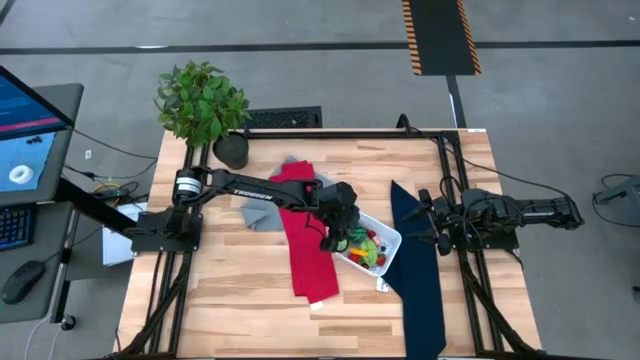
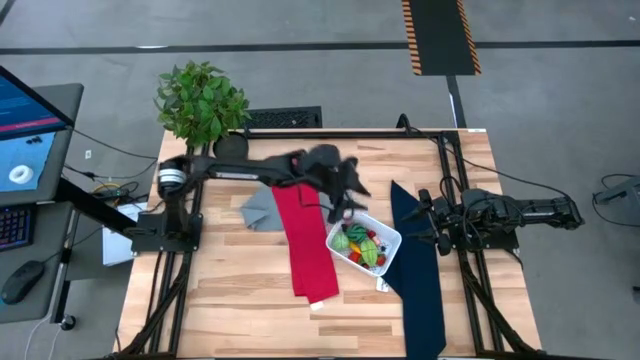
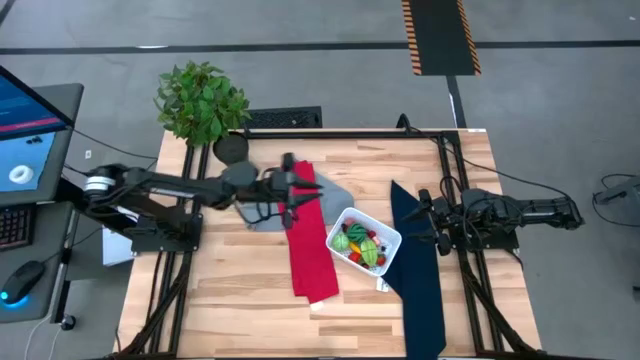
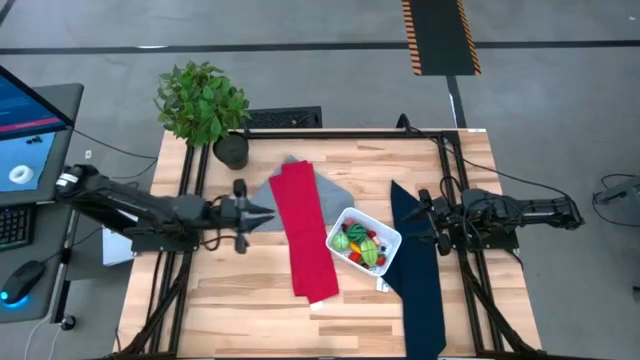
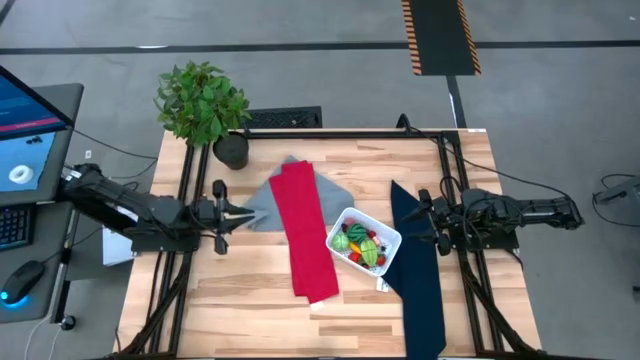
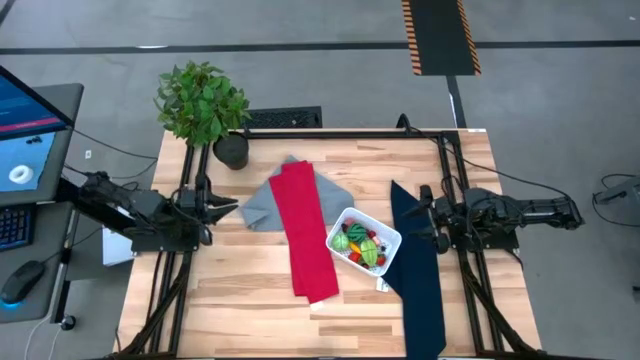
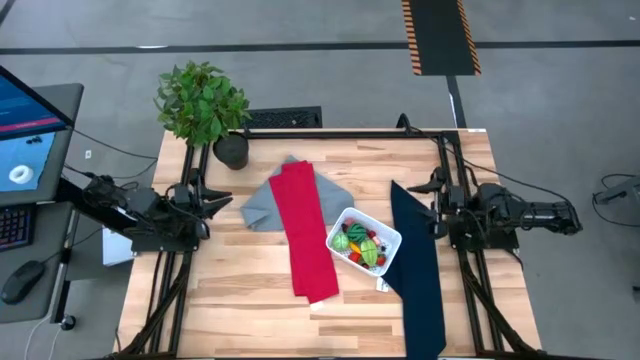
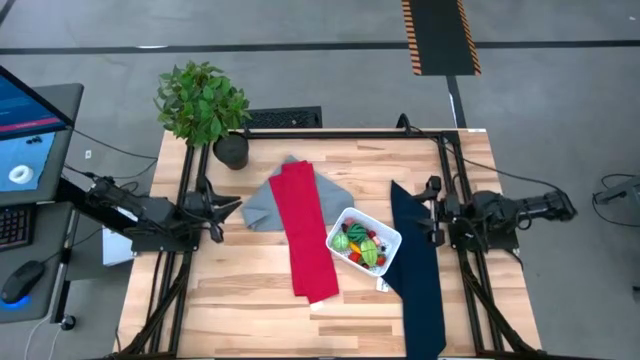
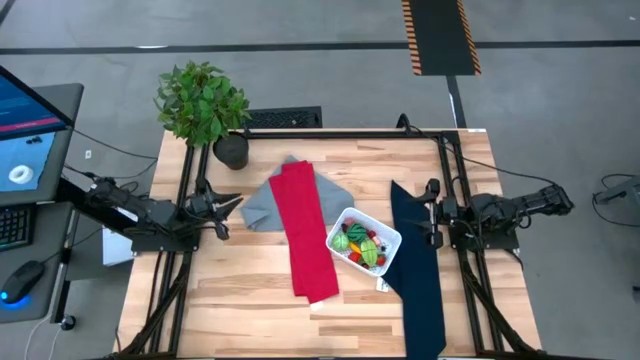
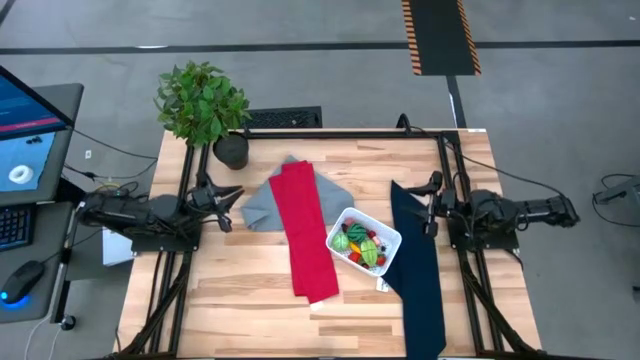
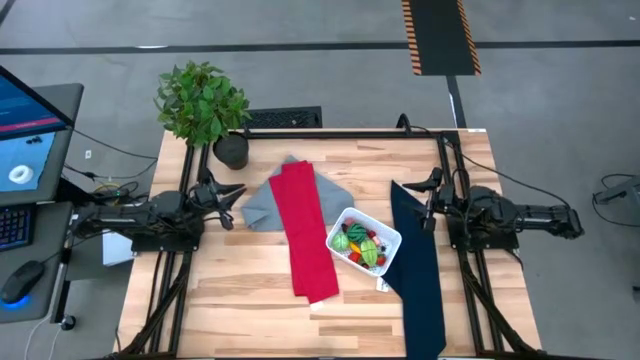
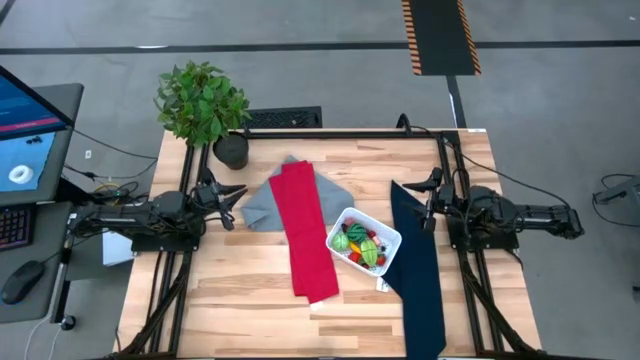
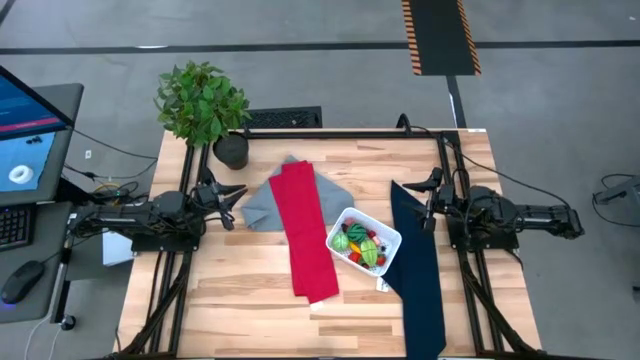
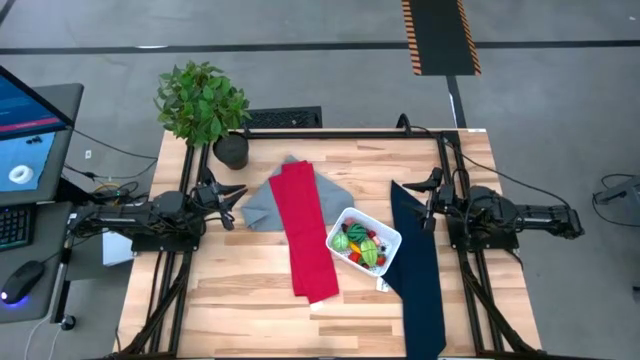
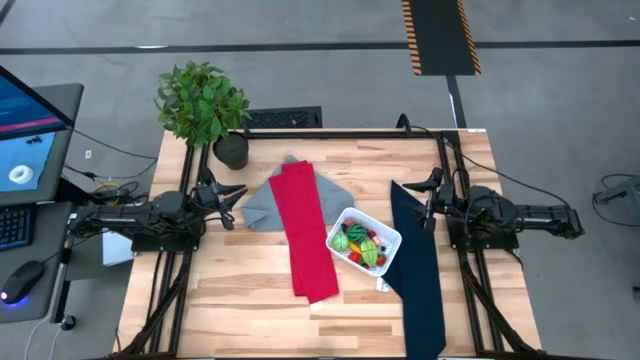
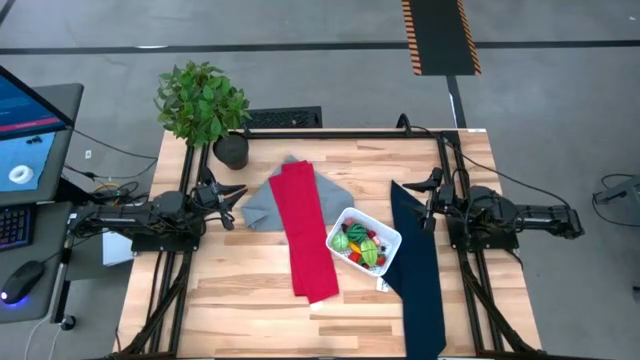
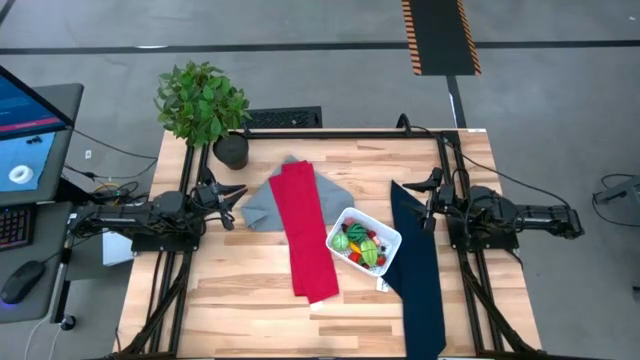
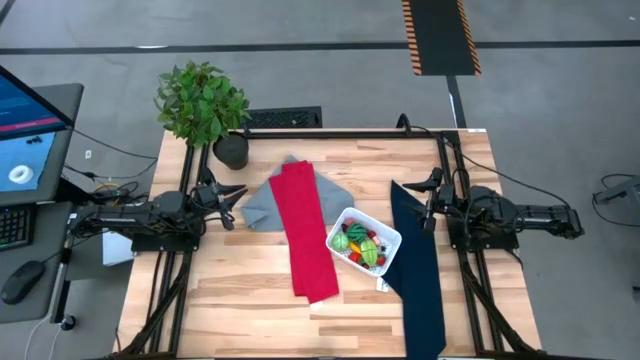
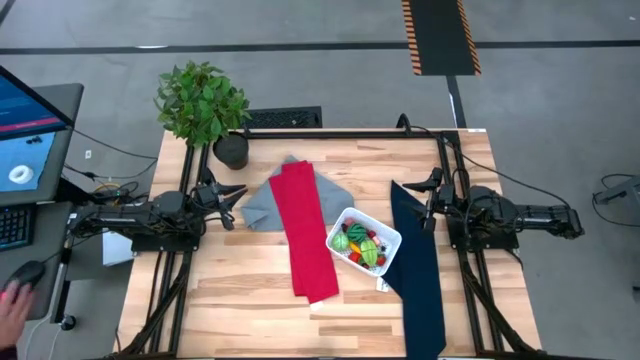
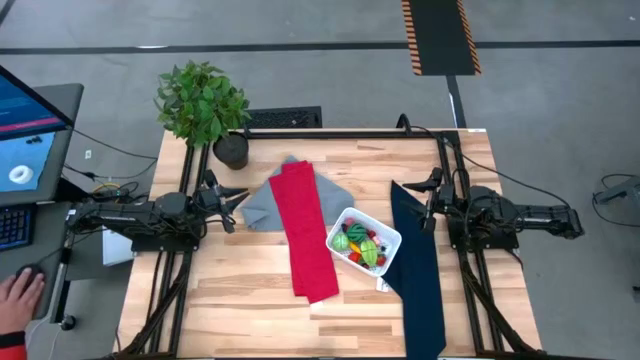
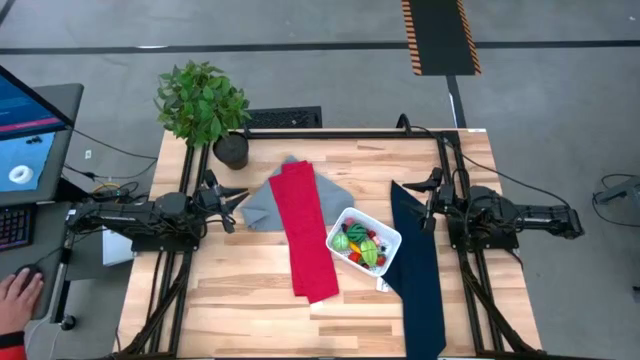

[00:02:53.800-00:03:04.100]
Task: Pick and placing Produce into tupperware
Return to Home Position

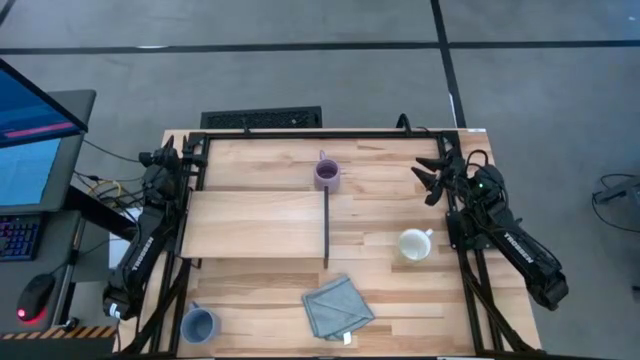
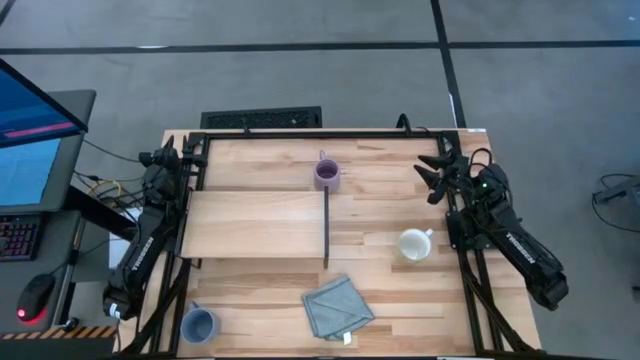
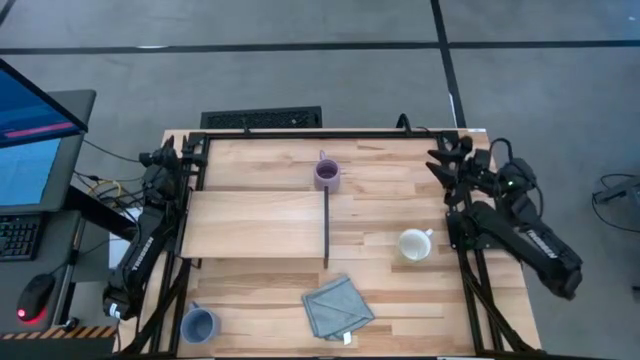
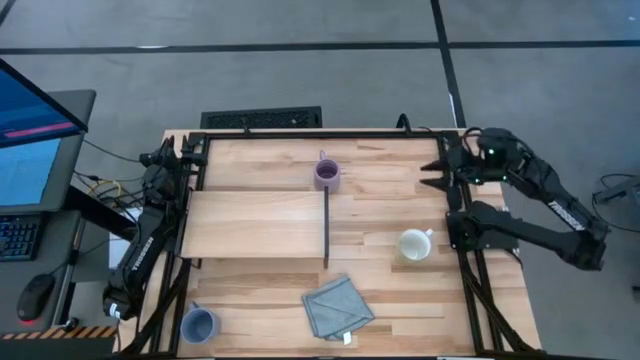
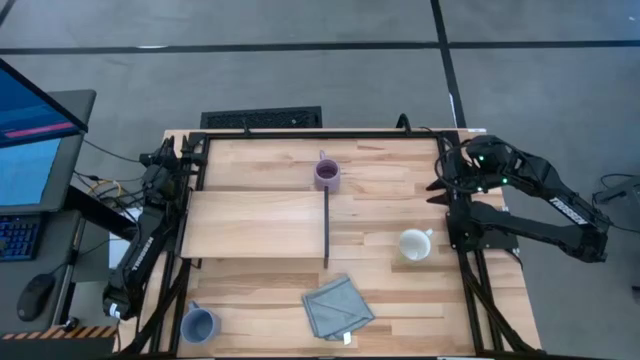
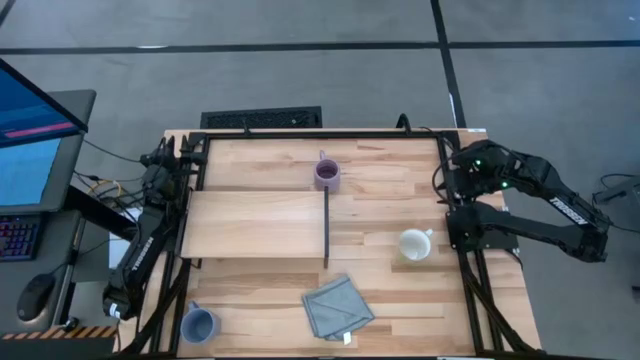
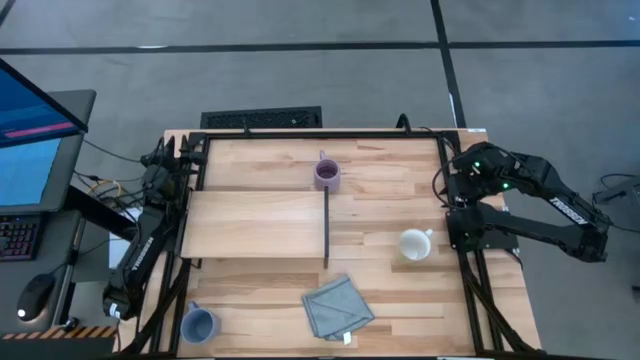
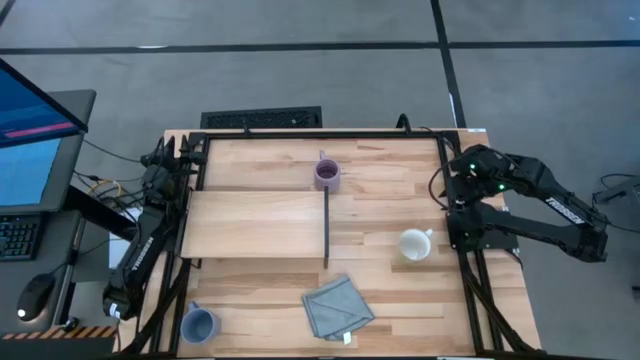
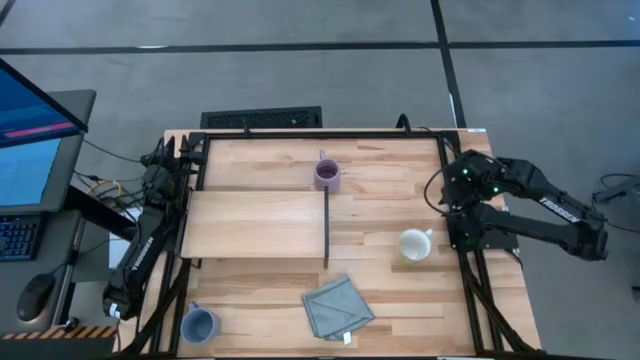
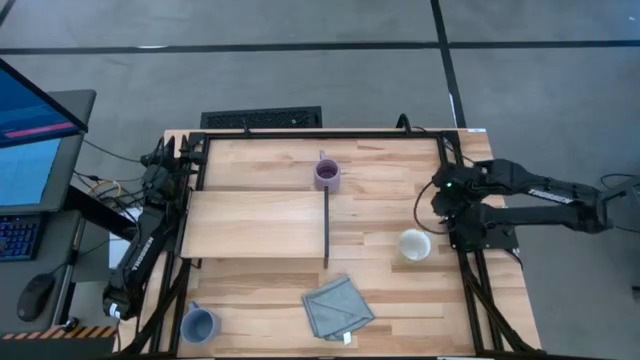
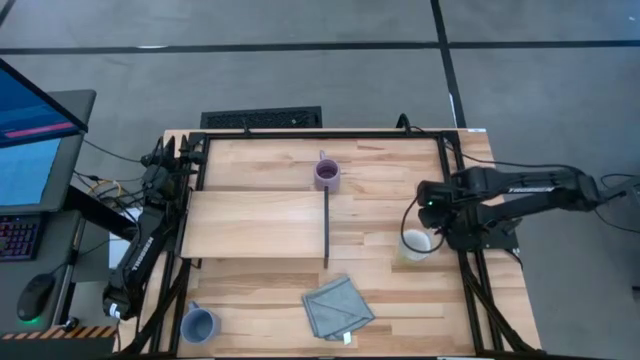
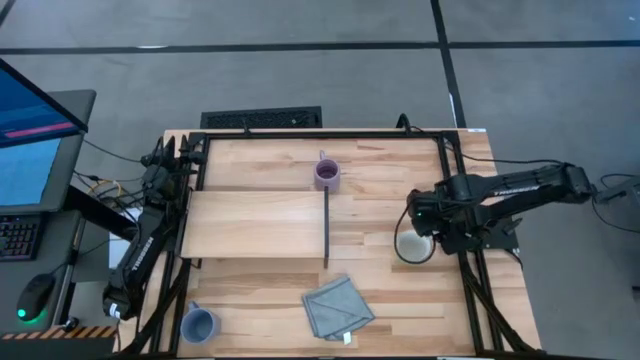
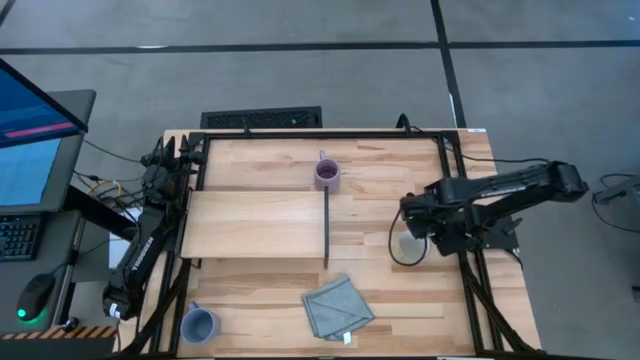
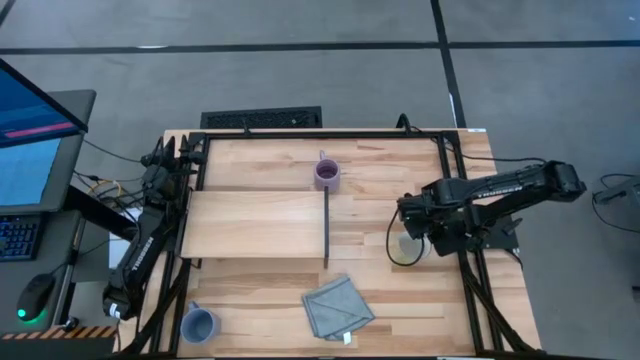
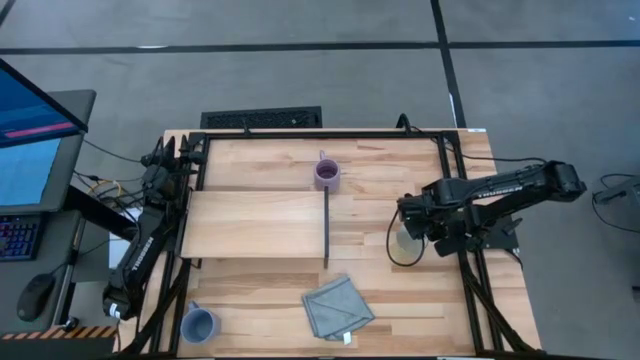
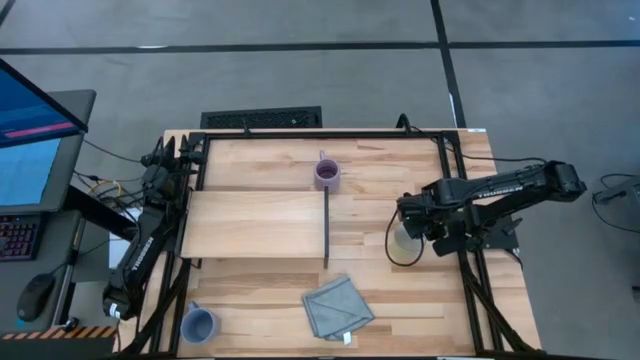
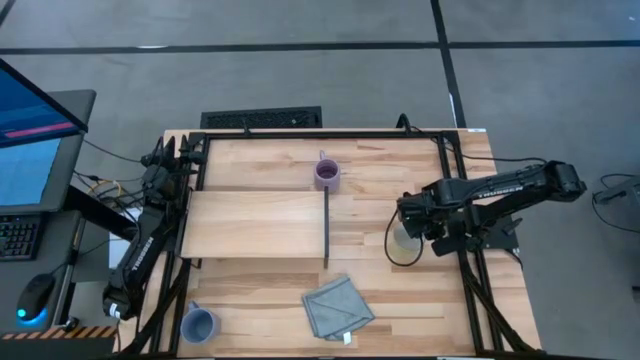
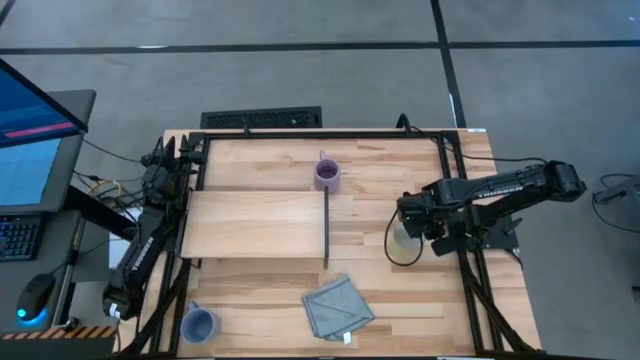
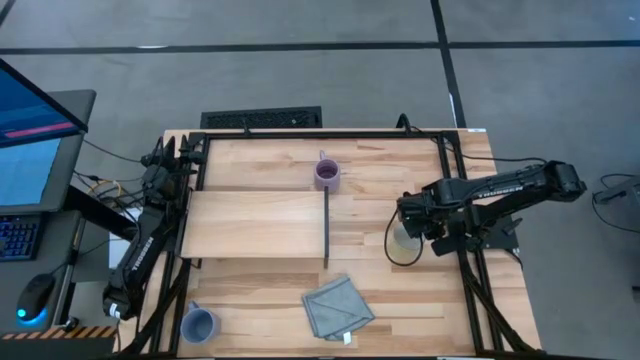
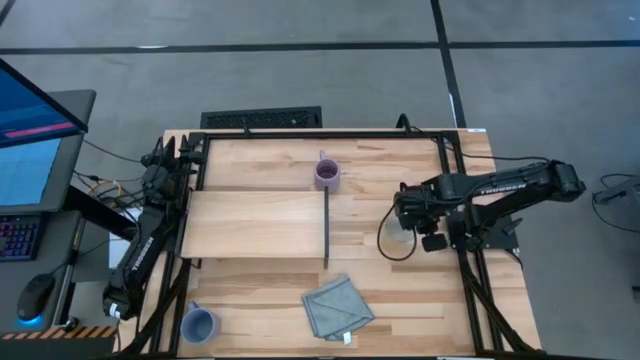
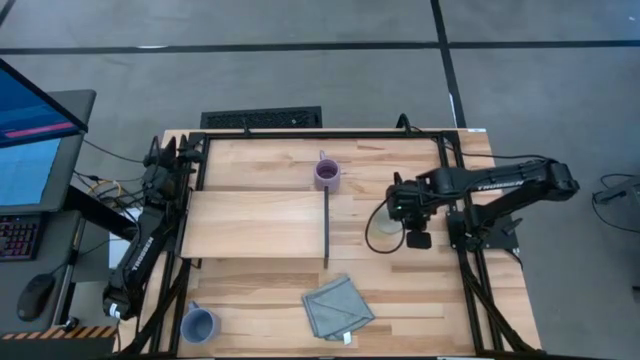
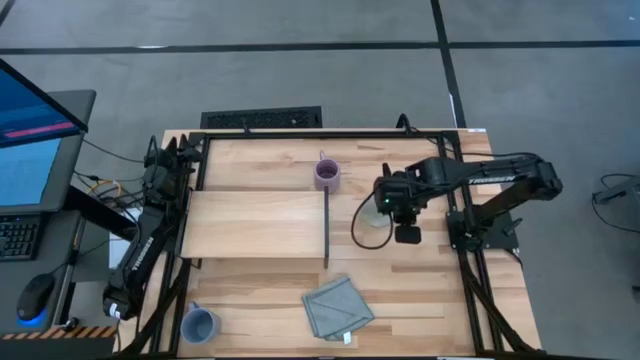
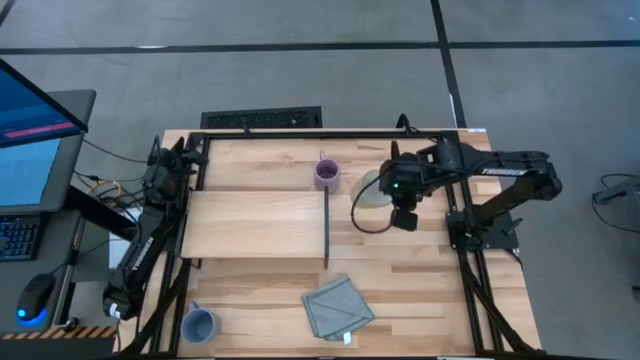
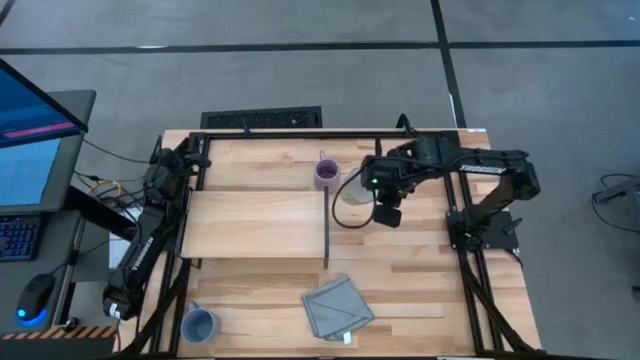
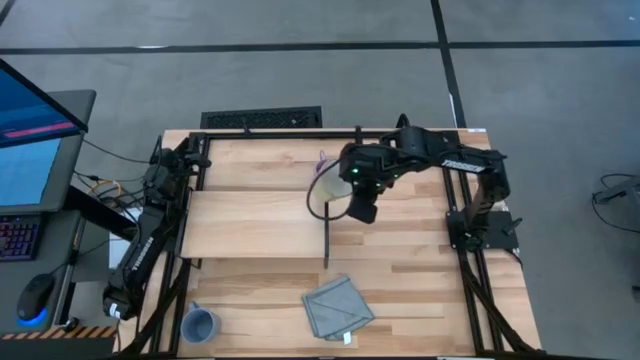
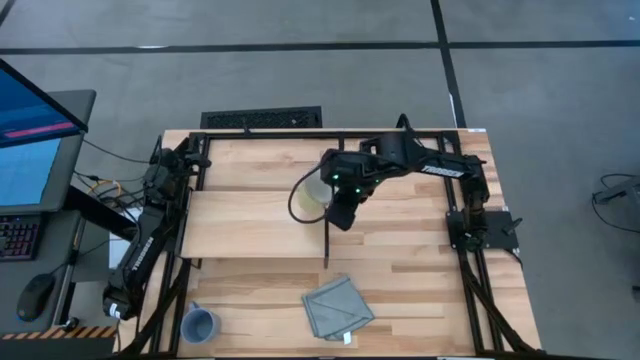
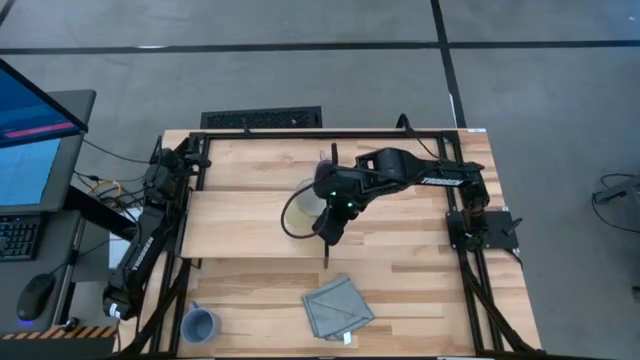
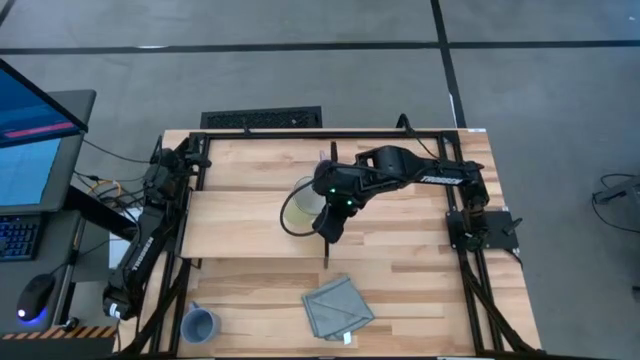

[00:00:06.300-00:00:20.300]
Task: Stack small to large cups/mugs on shelf
Put the white mug on the shelf
